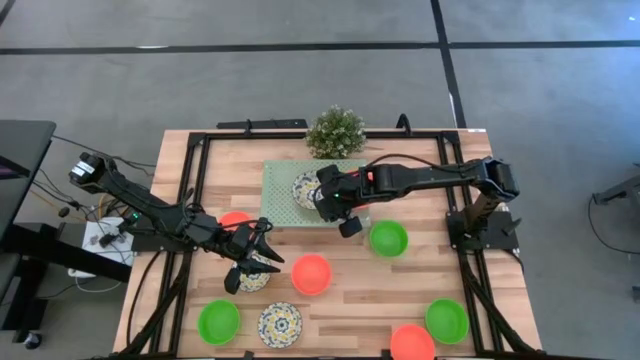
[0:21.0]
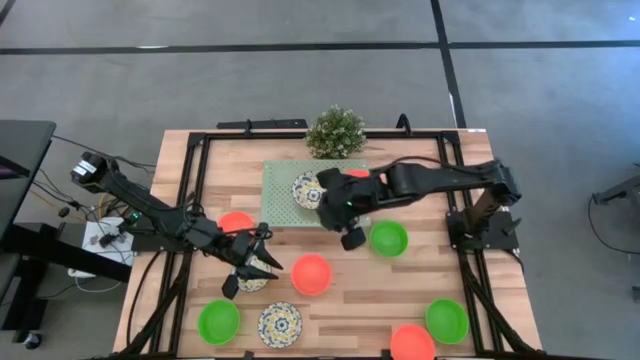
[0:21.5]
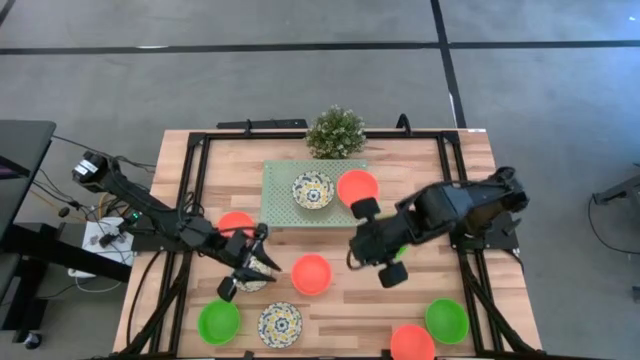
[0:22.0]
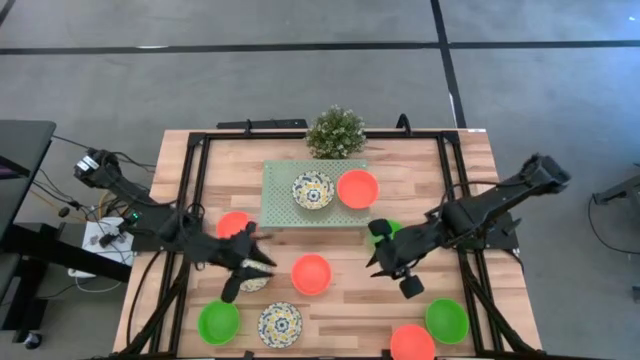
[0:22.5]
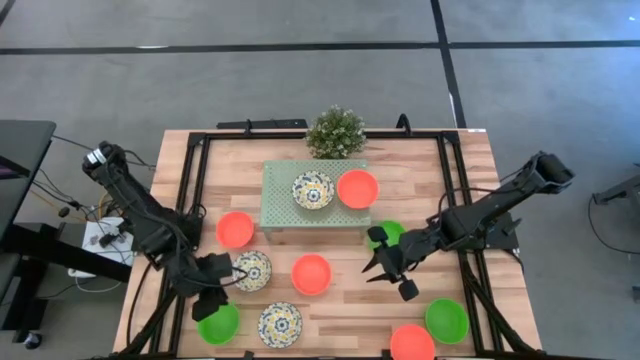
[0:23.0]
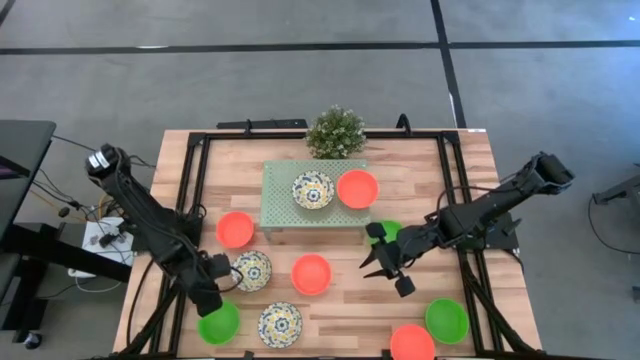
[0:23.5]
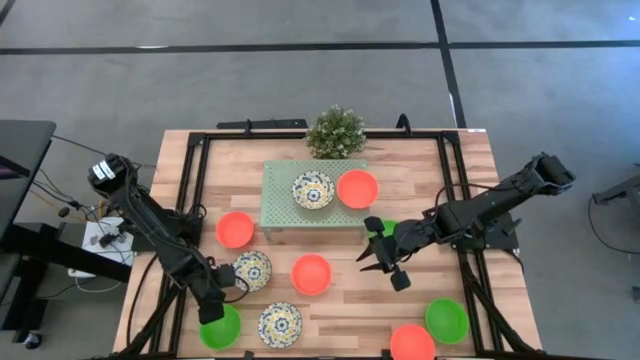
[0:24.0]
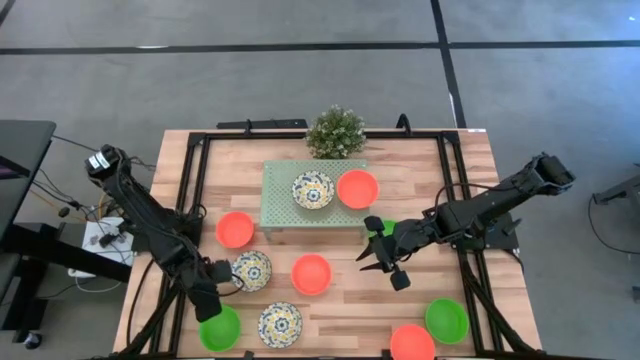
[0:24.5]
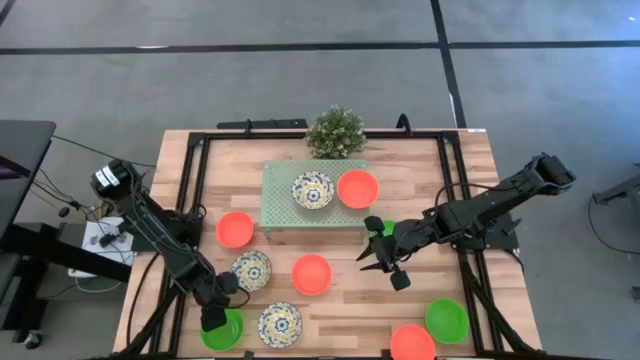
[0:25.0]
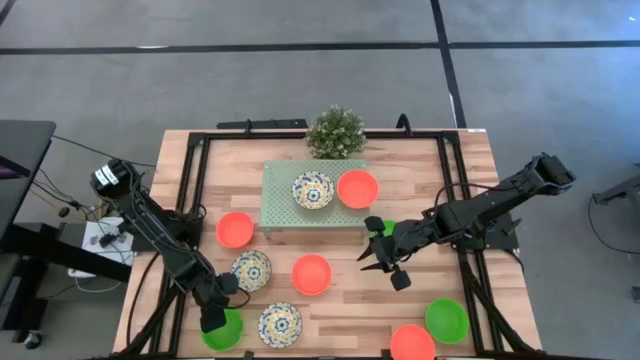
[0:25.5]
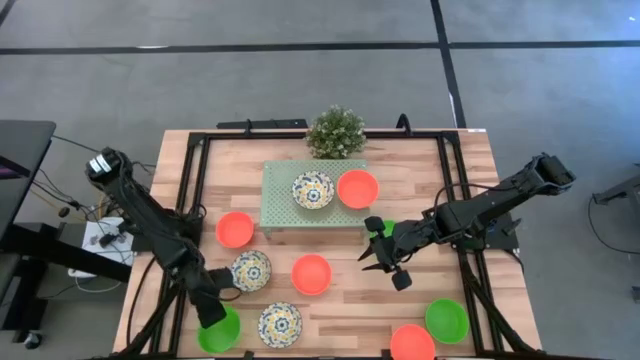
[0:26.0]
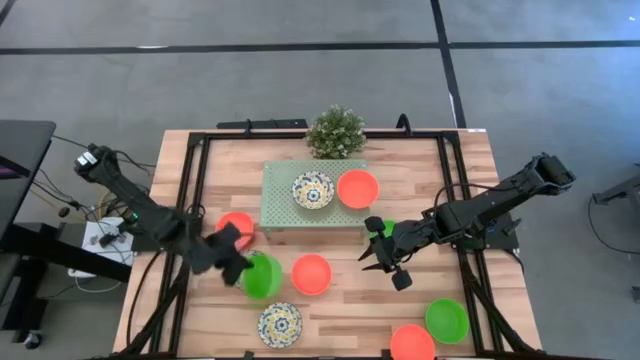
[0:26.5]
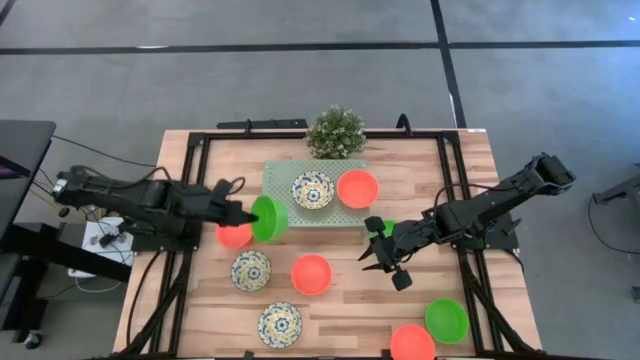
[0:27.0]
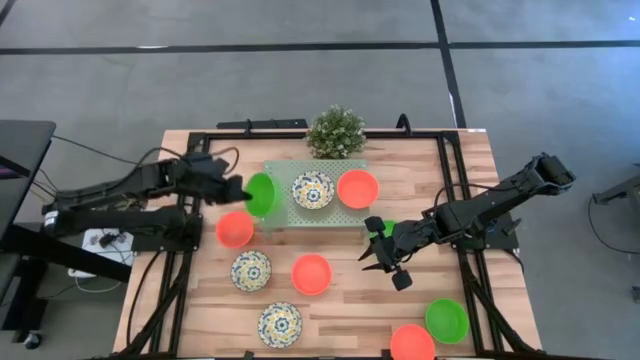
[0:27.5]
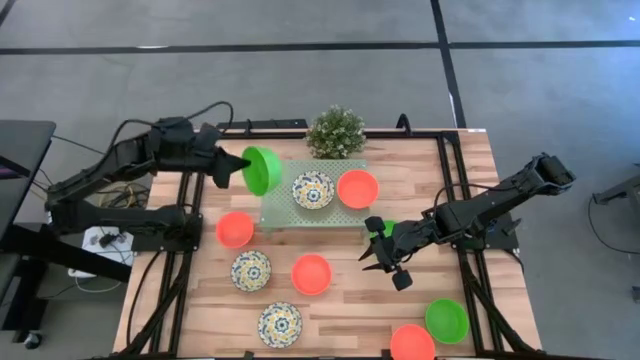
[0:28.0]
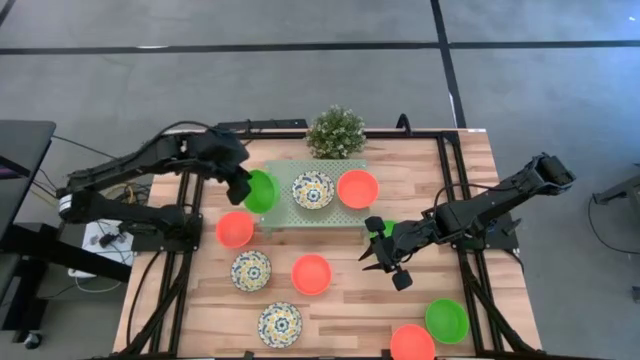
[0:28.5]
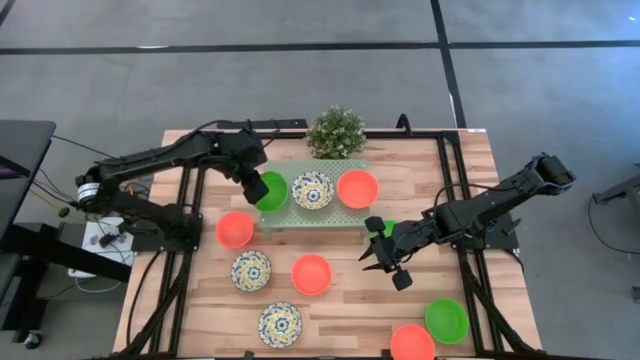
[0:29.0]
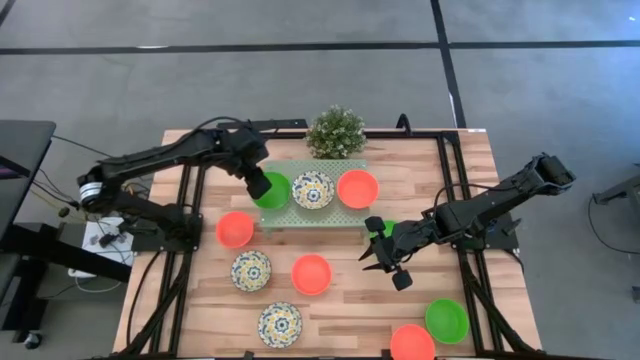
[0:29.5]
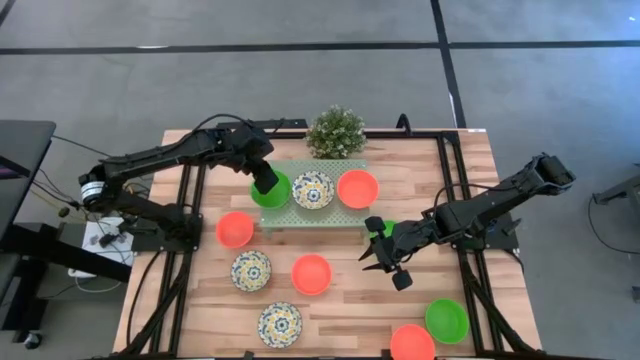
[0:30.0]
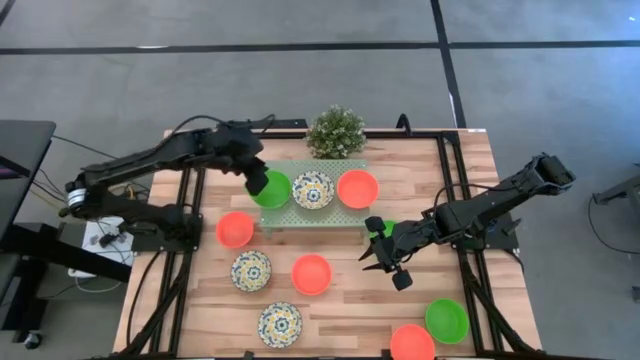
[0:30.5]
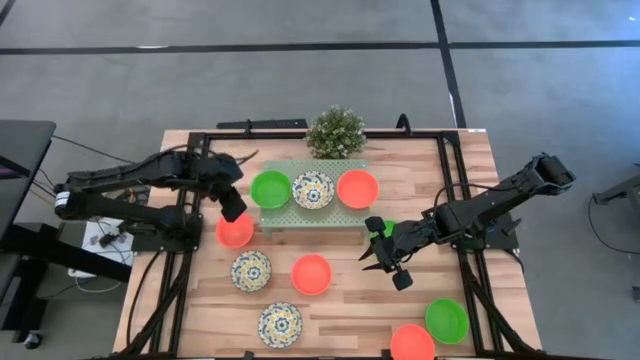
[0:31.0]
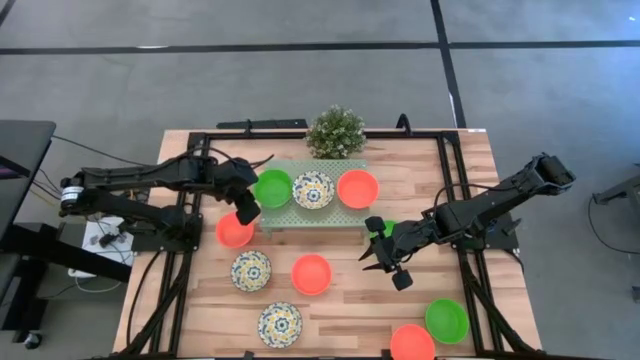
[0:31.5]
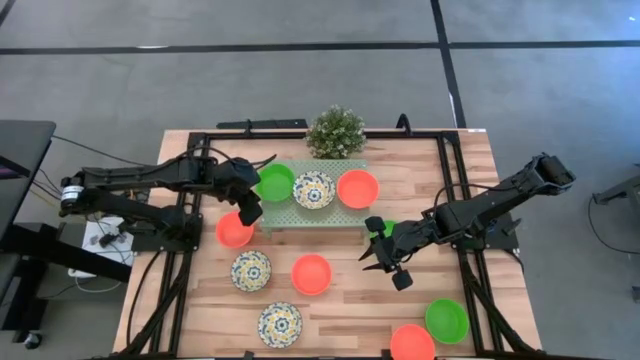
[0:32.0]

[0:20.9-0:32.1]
Task: Pick & Place Mini bowls
Put the green bowl on the shelf

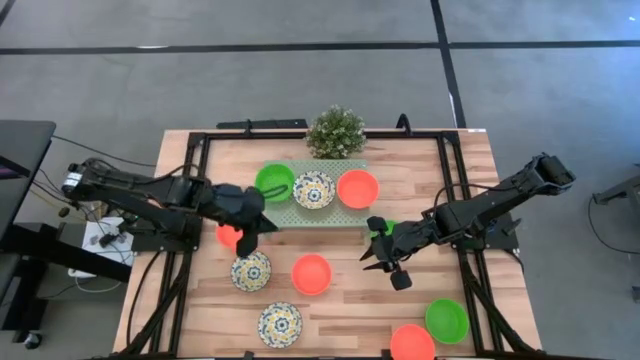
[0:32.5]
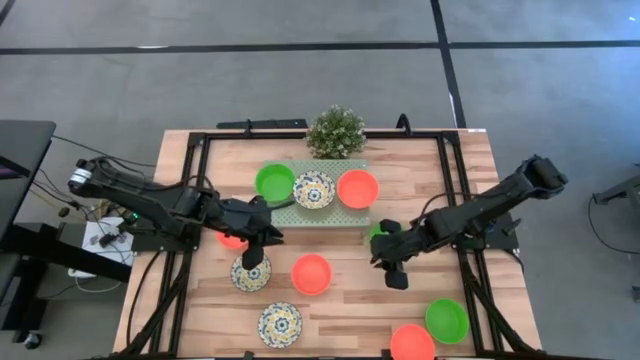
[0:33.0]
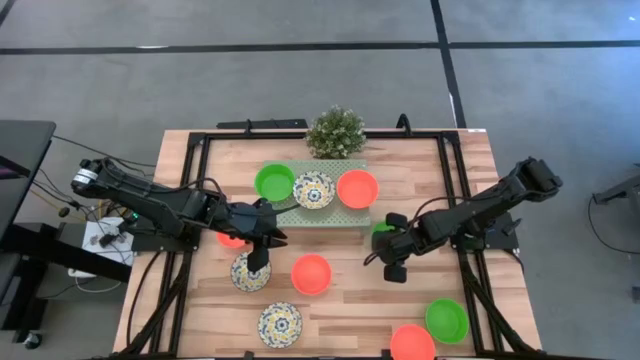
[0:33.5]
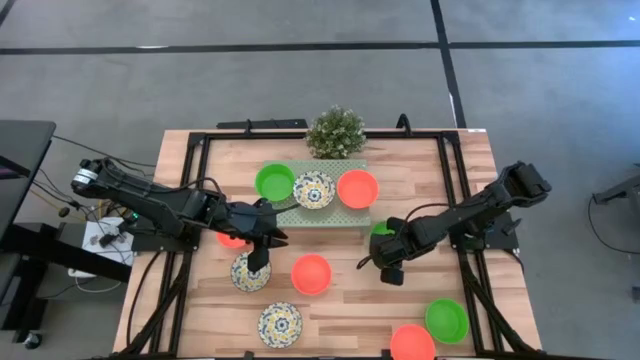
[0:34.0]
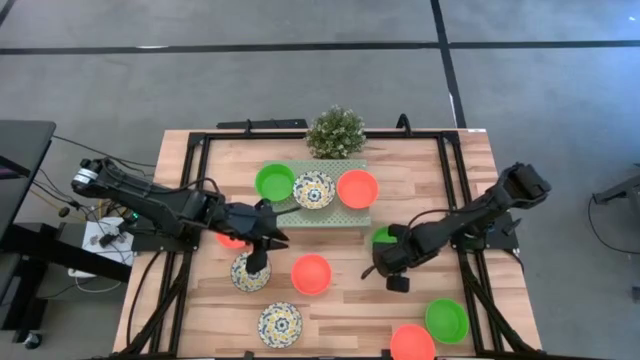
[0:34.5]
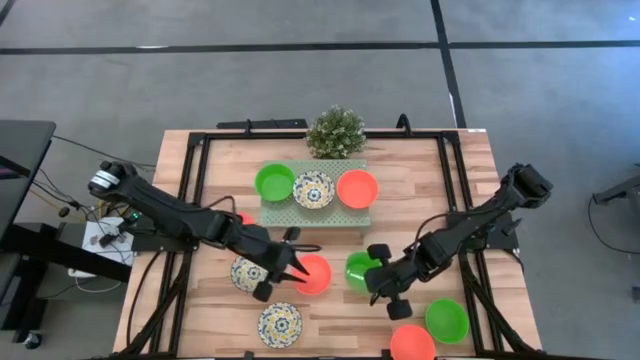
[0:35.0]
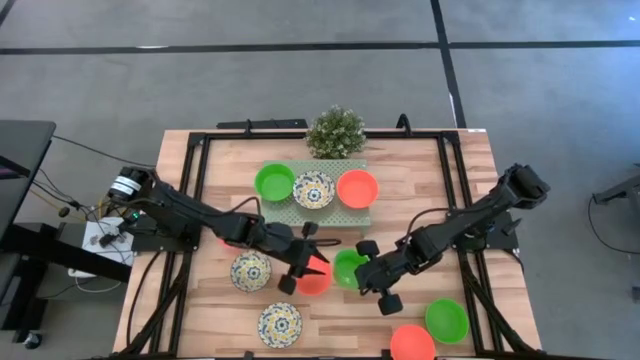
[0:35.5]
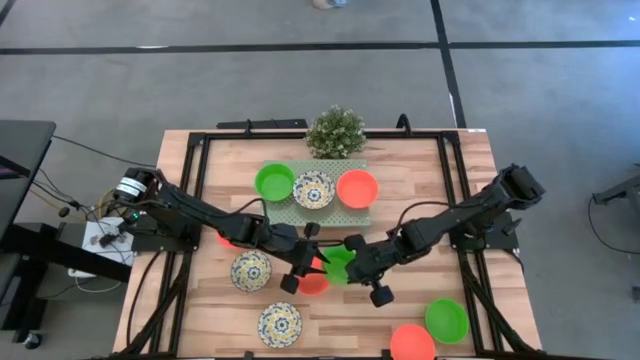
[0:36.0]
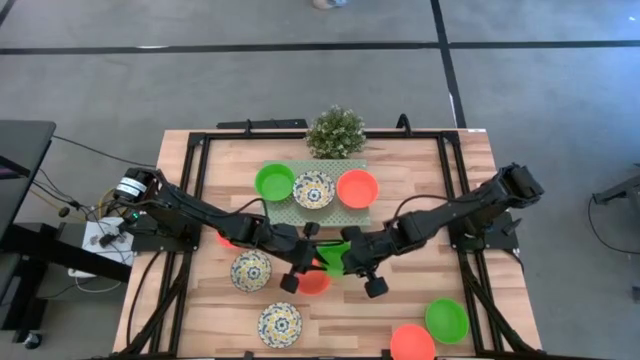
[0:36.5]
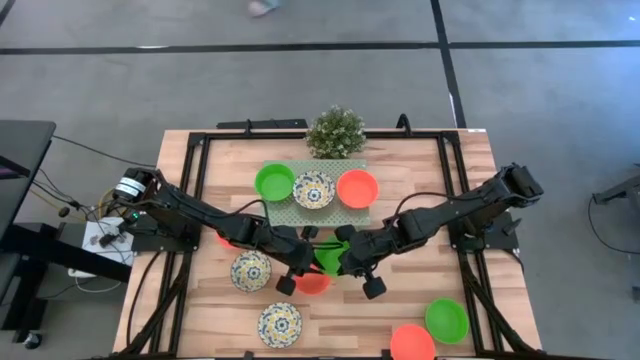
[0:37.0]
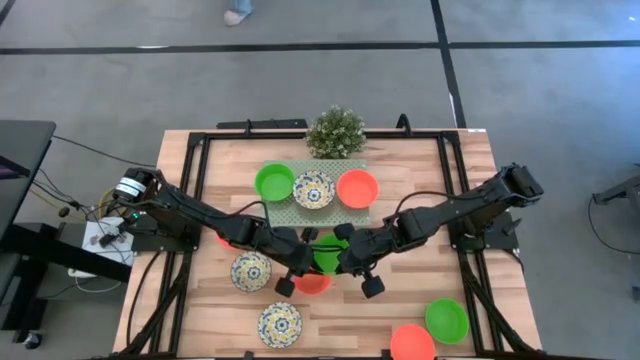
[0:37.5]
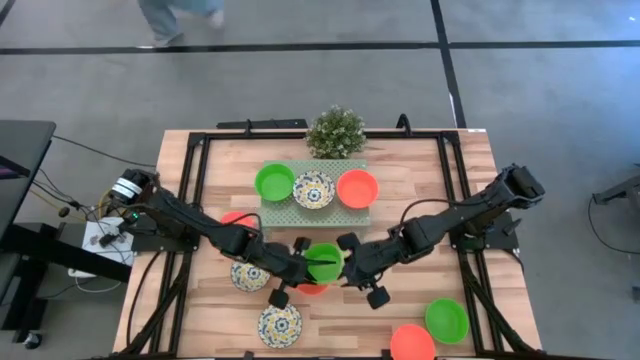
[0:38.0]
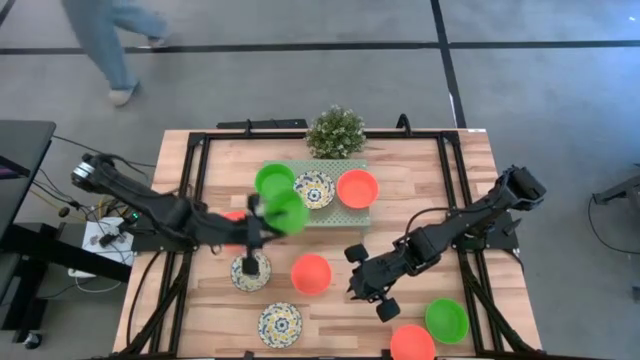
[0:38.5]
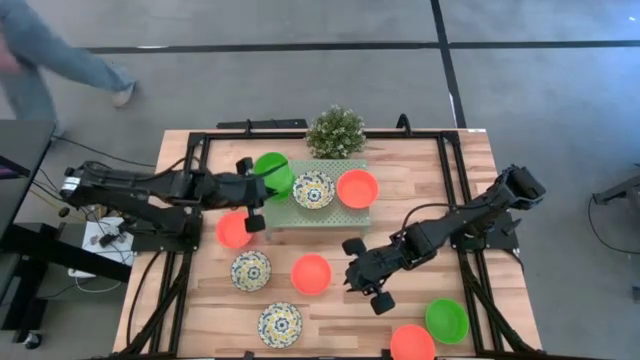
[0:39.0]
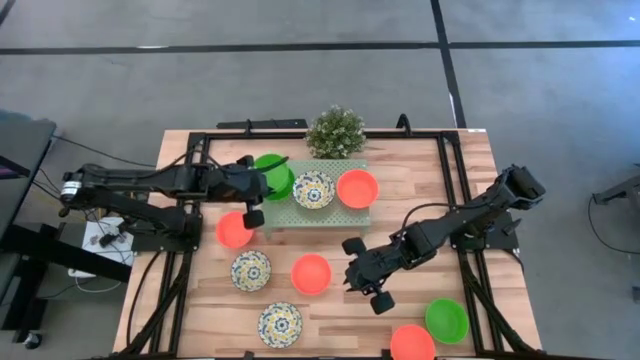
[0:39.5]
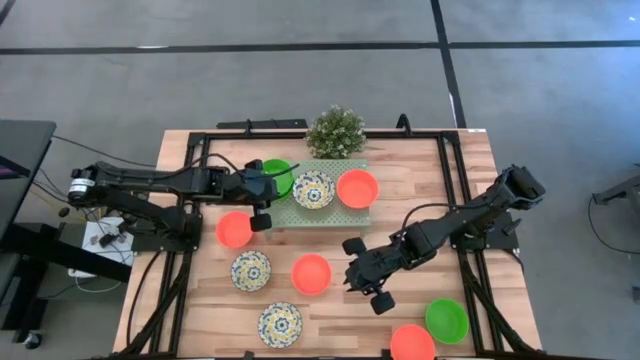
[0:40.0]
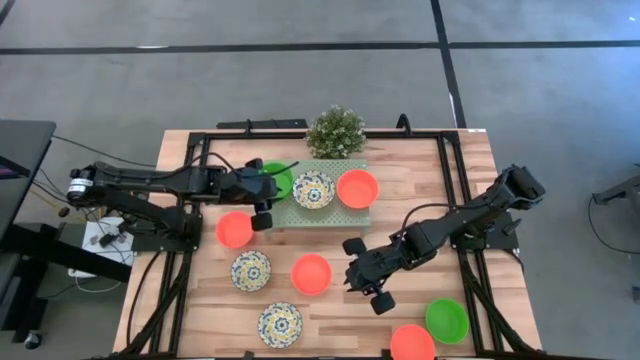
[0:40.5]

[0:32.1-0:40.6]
Stack the green bowl on the green bowl on the shelf
